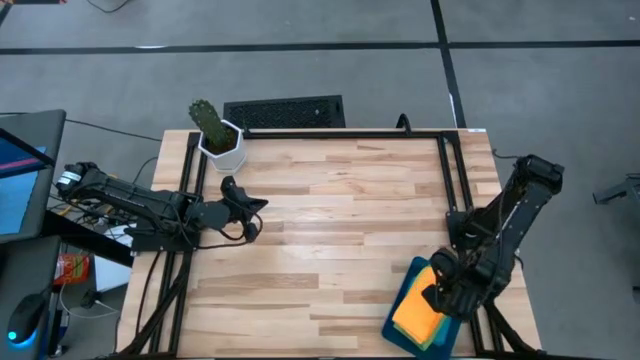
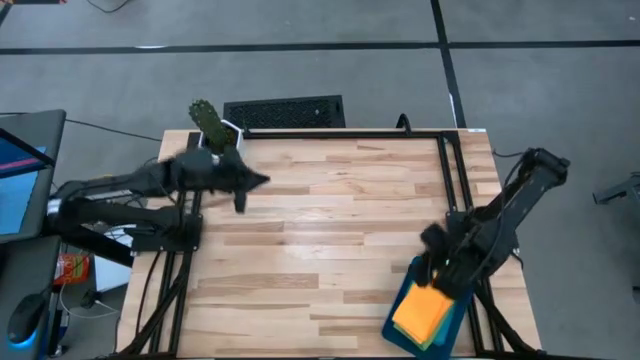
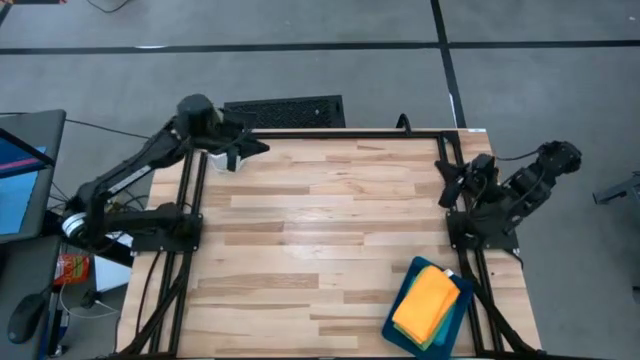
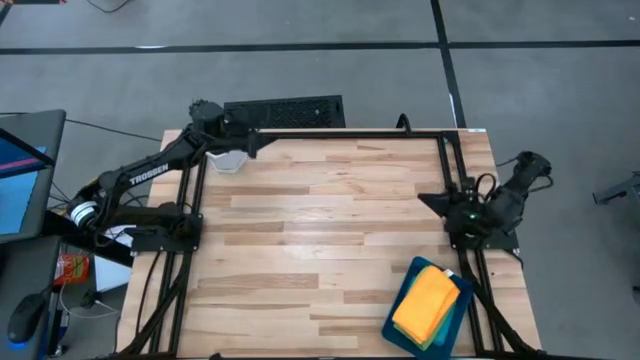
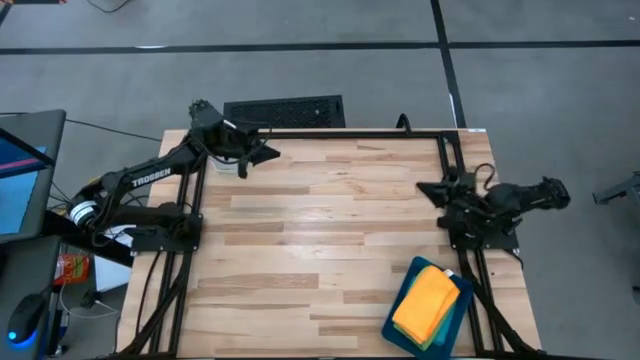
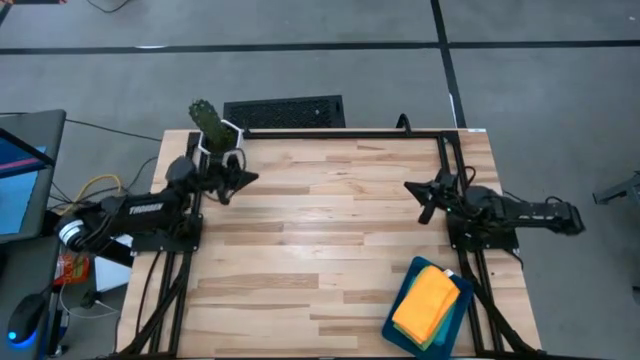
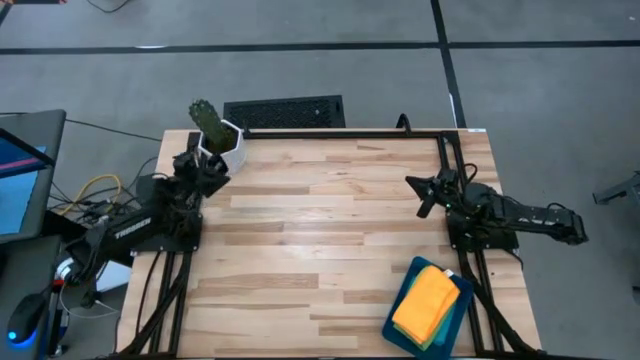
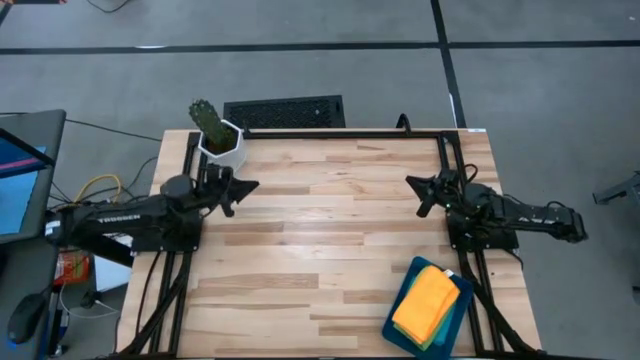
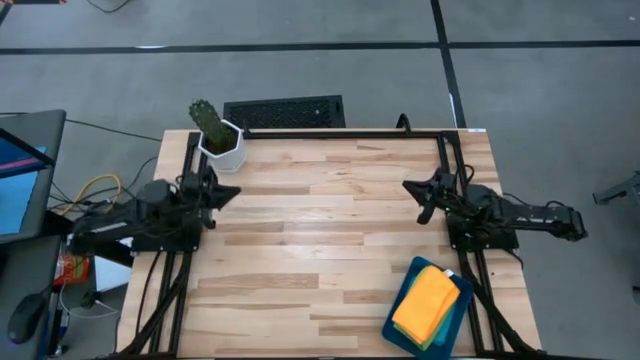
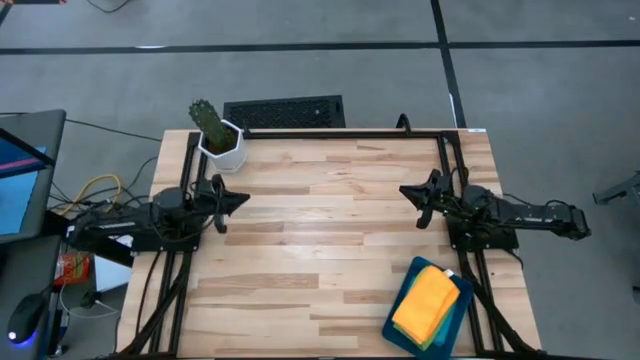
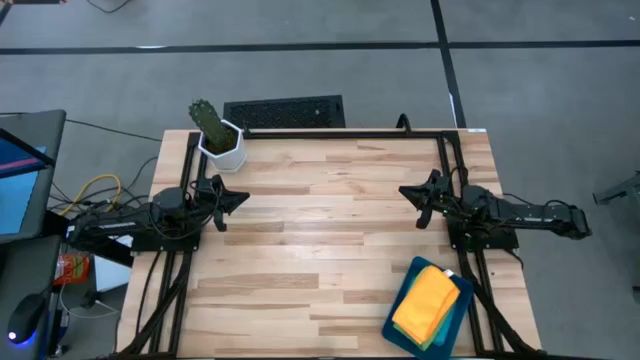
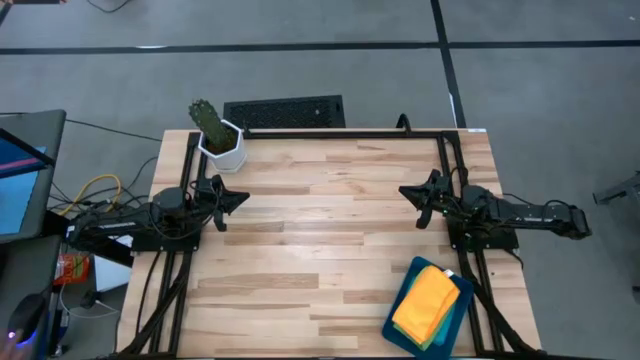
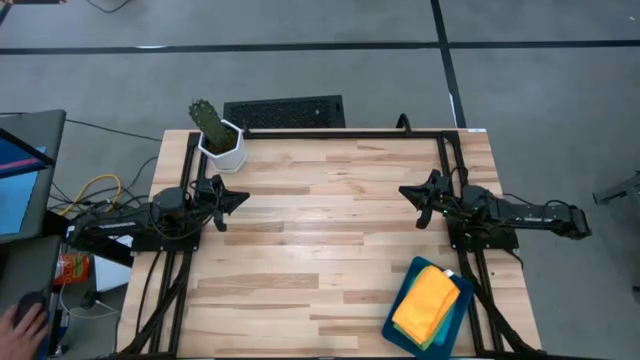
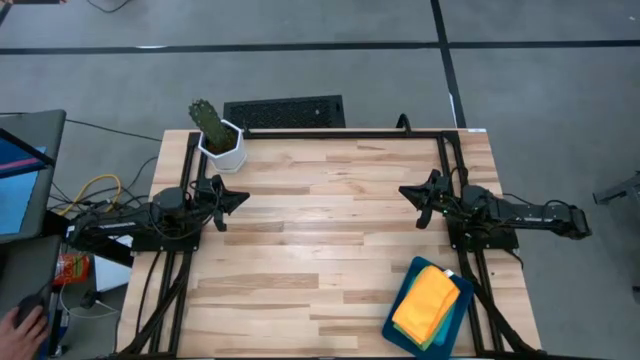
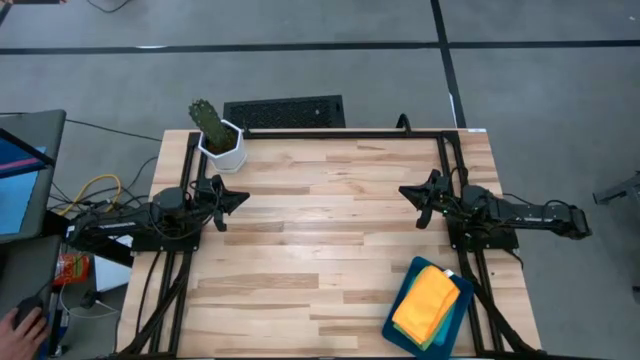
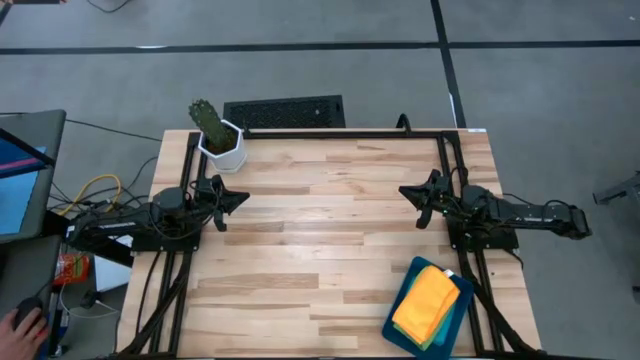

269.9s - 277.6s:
Task: Fold microfiber towels
Return to Home Position

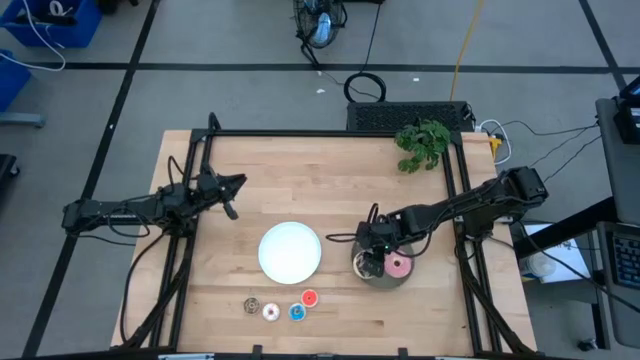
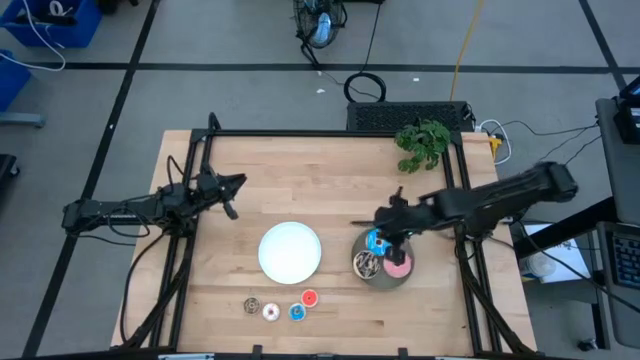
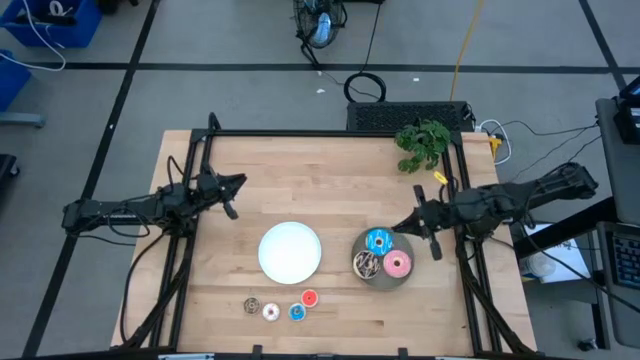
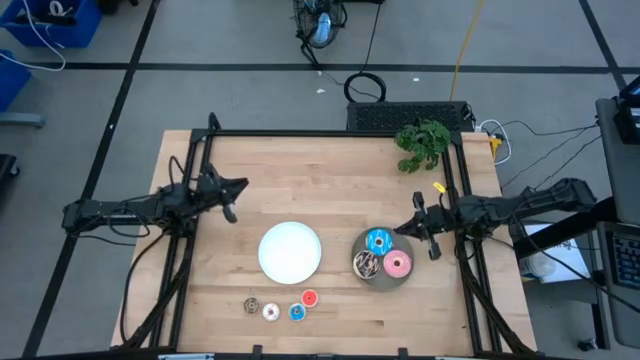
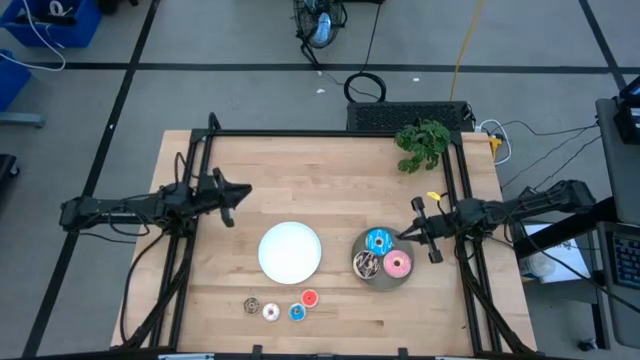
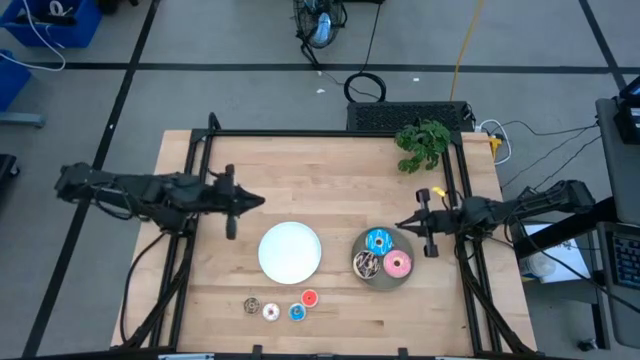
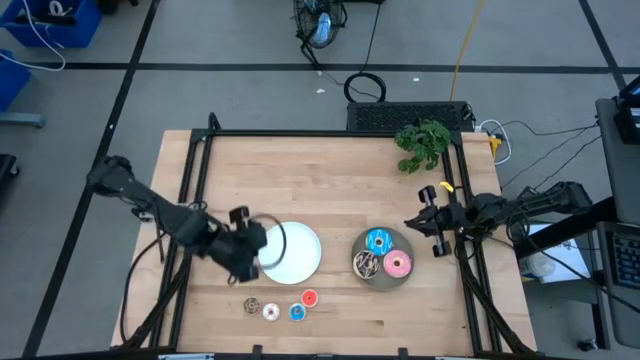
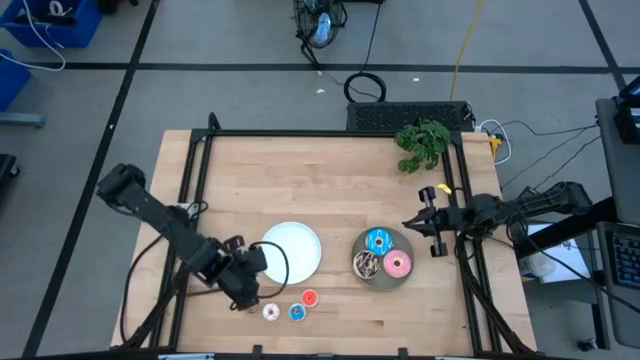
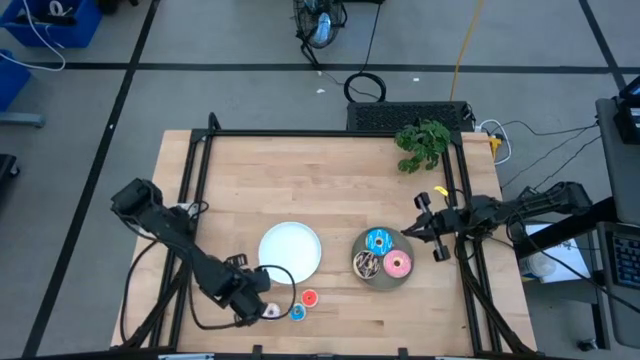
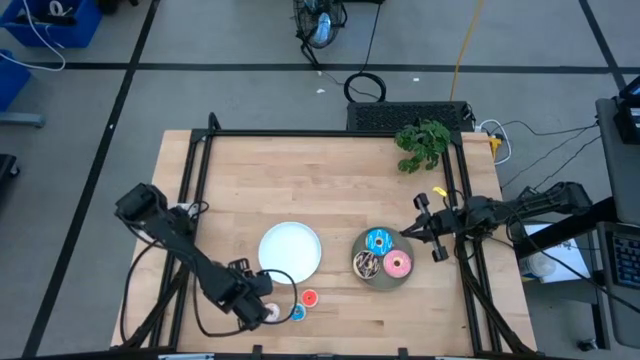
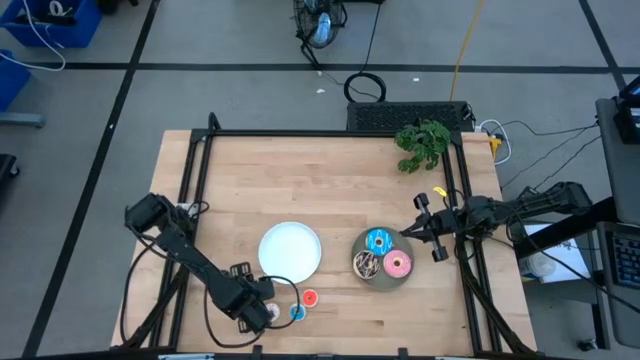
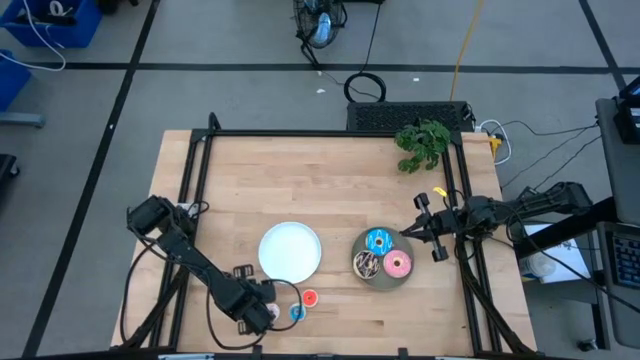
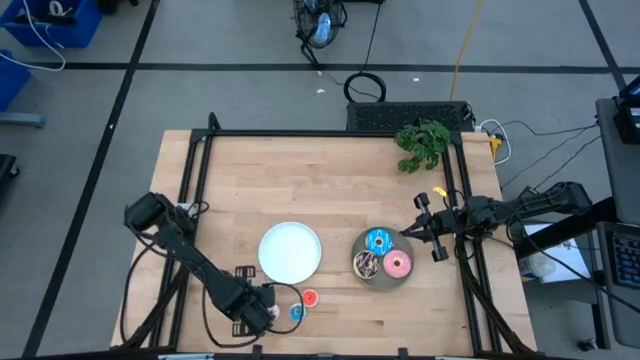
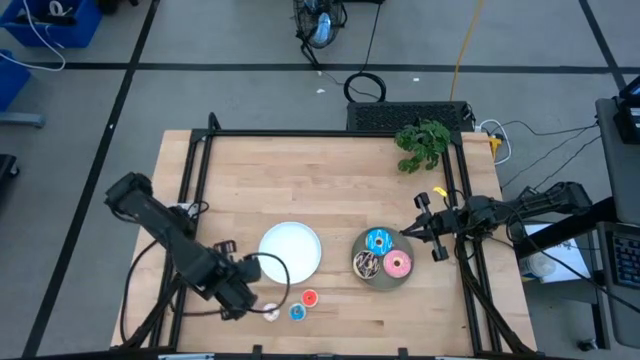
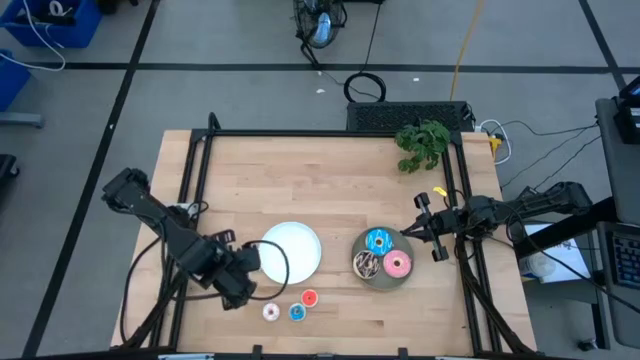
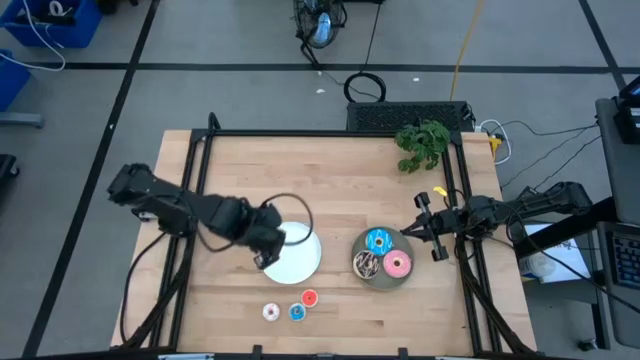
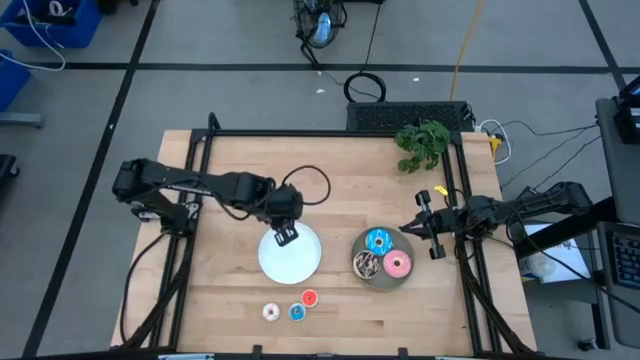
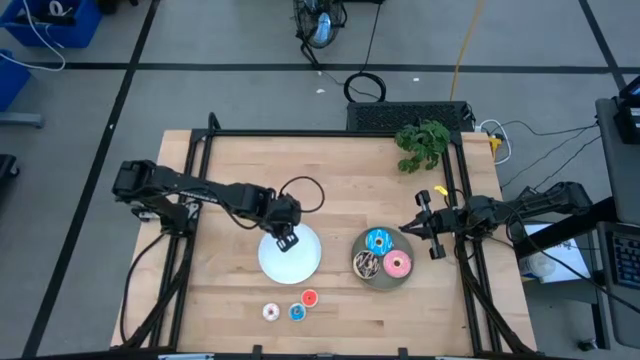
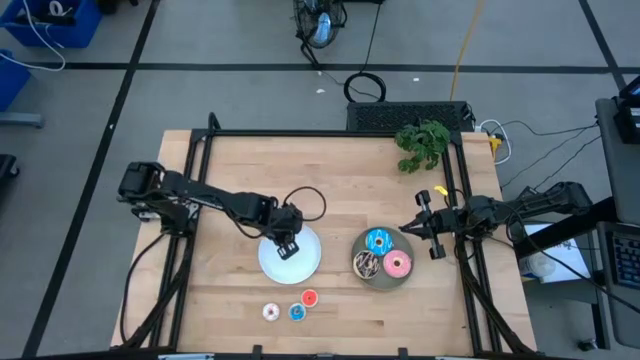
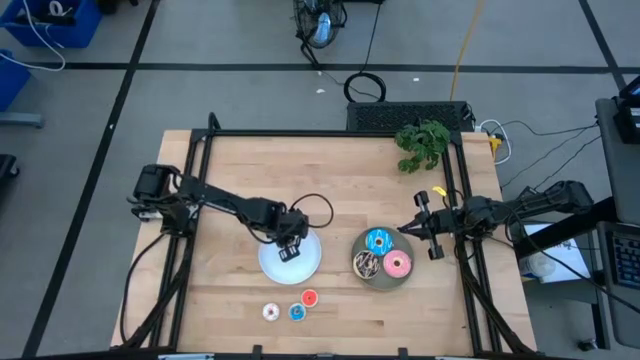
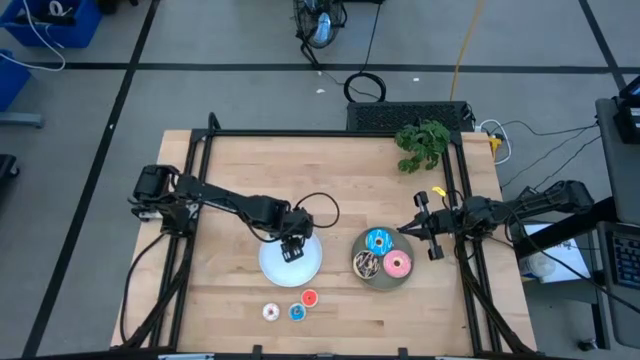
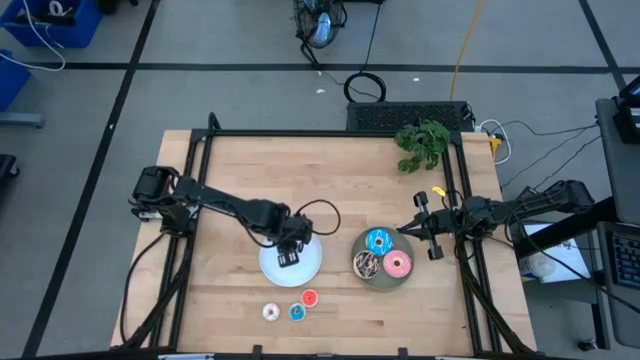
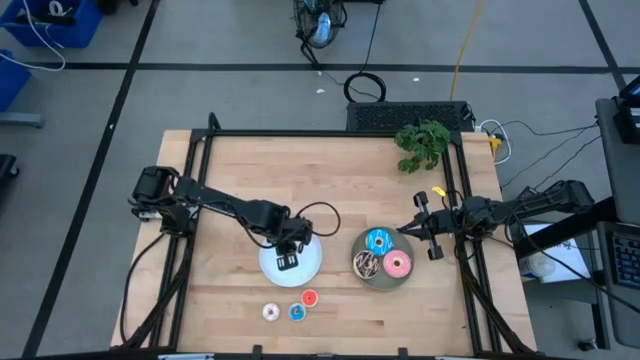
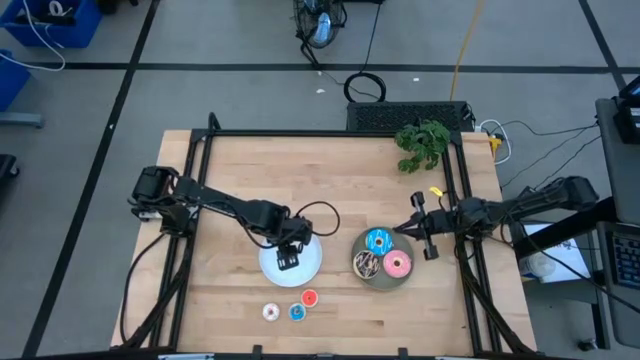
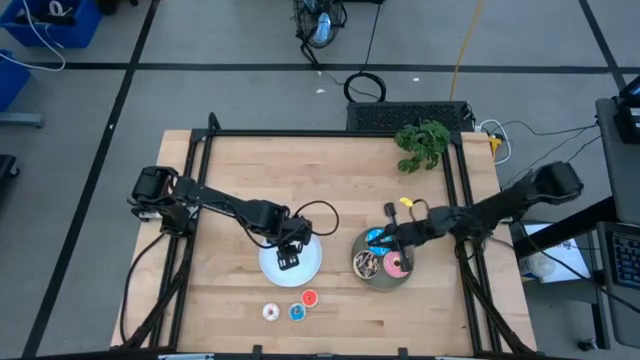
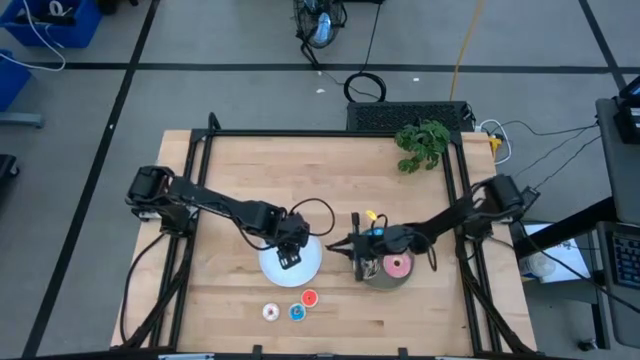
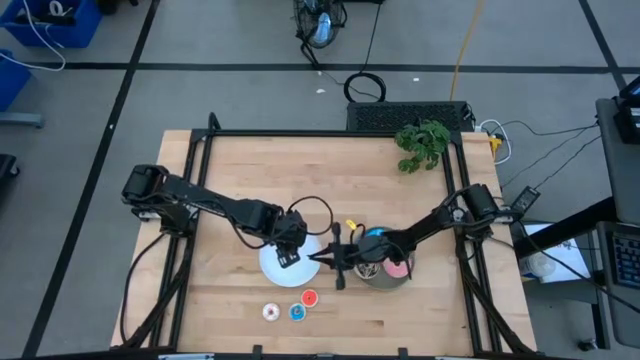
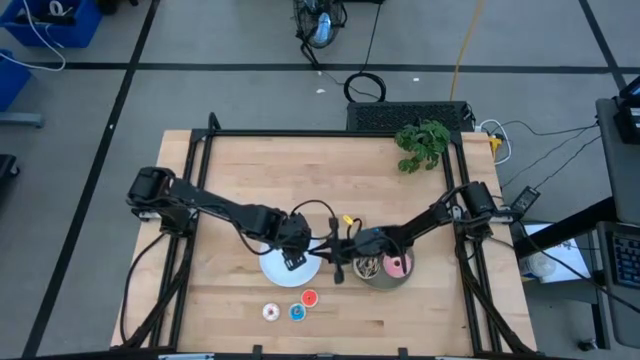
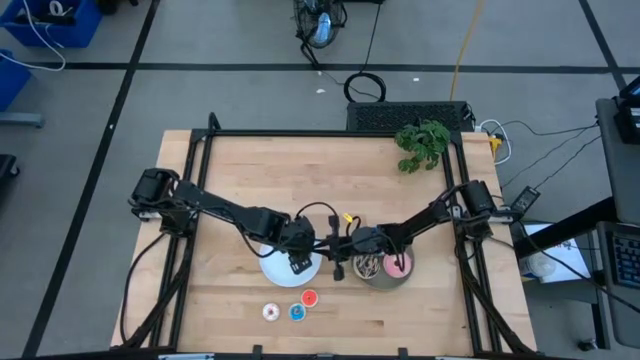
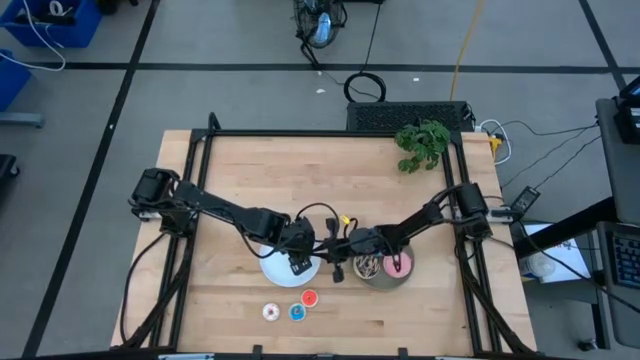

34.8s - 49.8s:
Task: Pick & Place donuts
Put the small brown donut on the white plate
